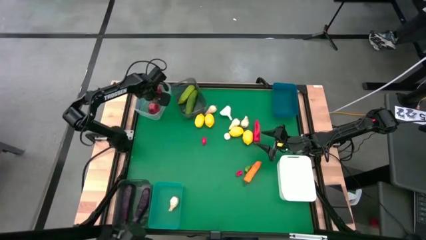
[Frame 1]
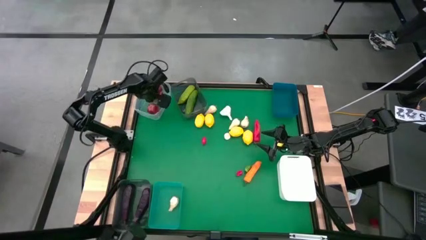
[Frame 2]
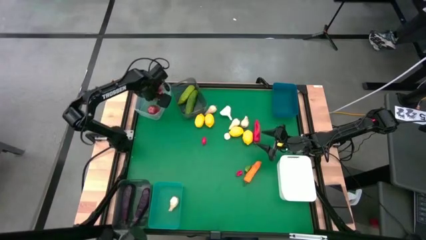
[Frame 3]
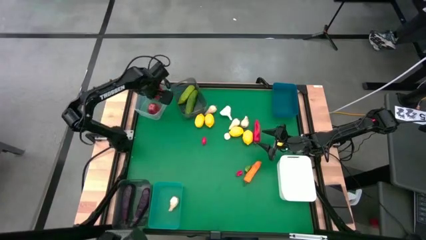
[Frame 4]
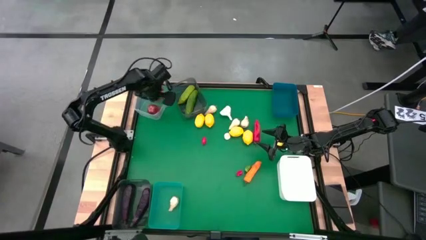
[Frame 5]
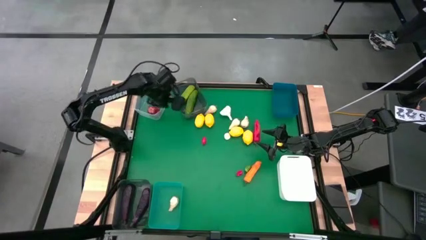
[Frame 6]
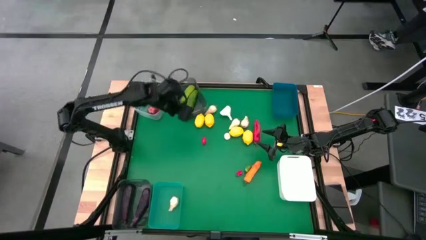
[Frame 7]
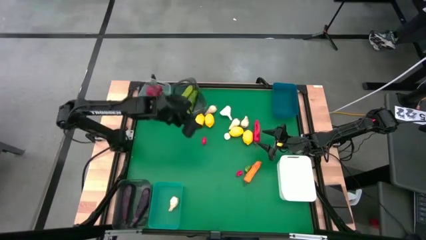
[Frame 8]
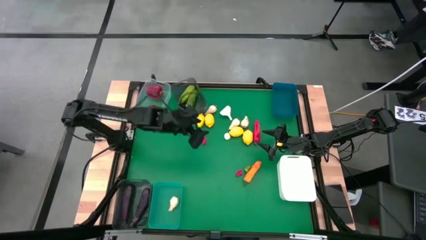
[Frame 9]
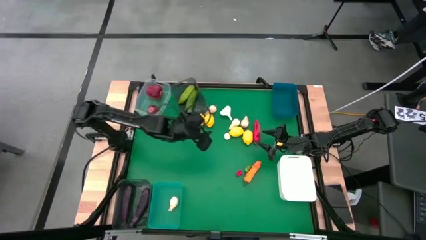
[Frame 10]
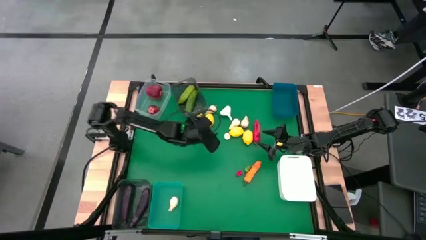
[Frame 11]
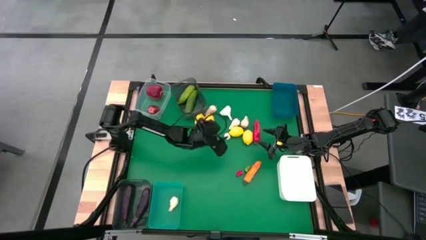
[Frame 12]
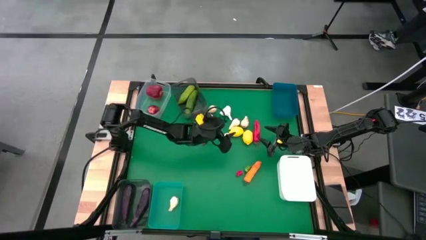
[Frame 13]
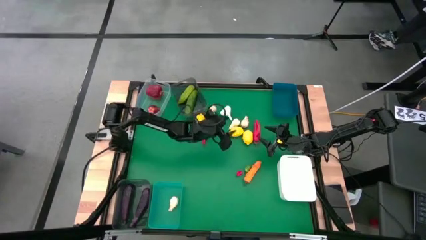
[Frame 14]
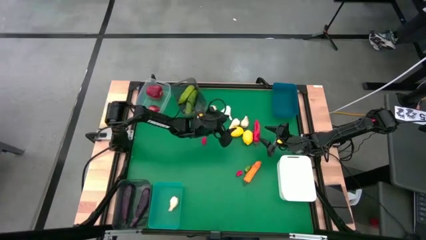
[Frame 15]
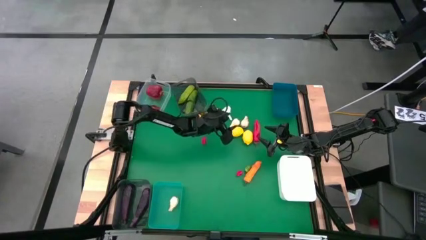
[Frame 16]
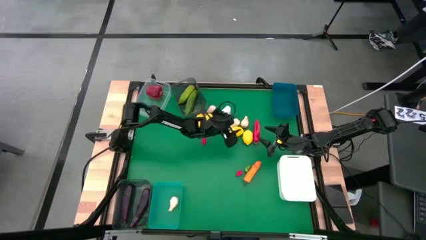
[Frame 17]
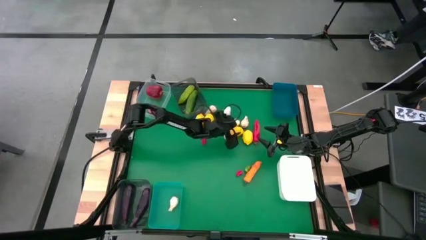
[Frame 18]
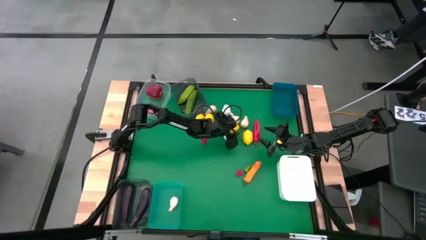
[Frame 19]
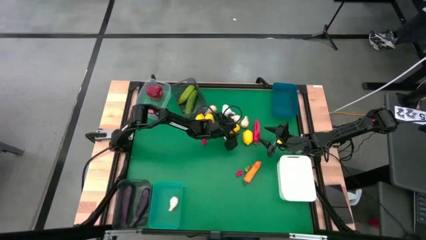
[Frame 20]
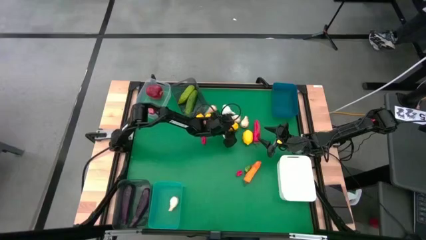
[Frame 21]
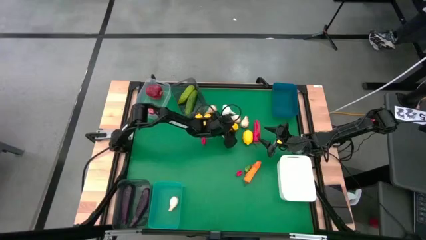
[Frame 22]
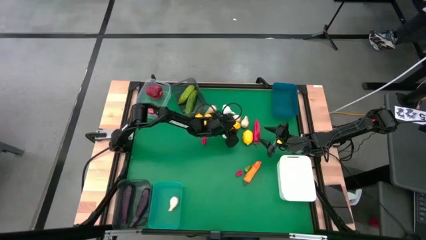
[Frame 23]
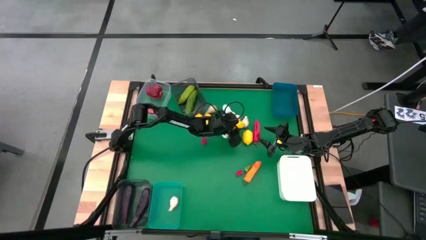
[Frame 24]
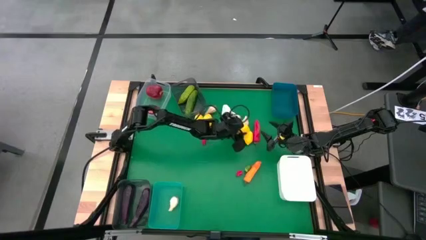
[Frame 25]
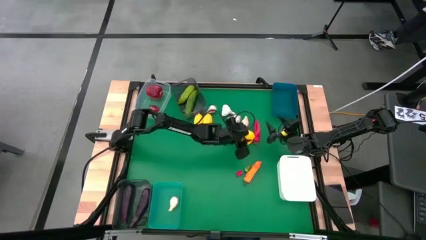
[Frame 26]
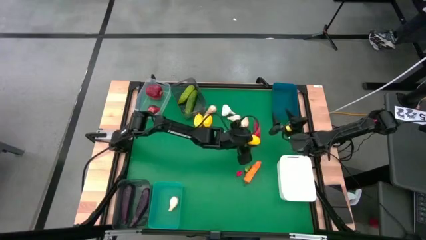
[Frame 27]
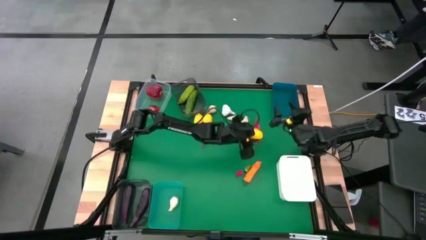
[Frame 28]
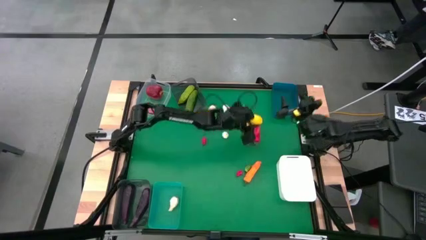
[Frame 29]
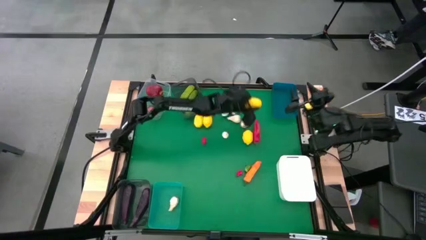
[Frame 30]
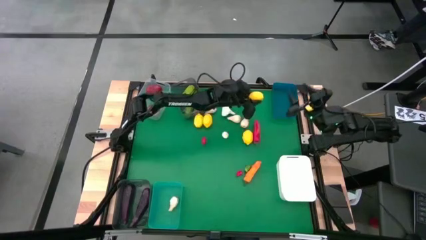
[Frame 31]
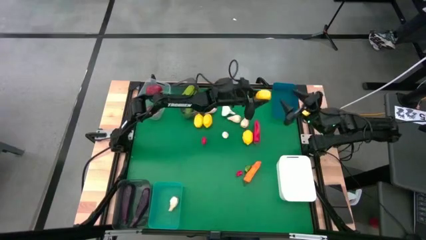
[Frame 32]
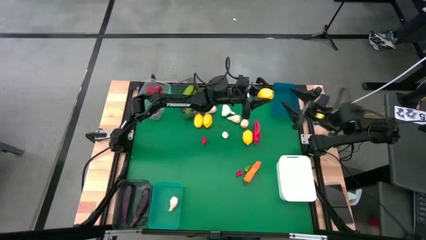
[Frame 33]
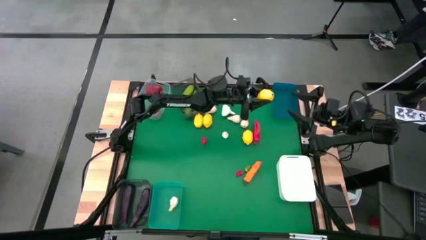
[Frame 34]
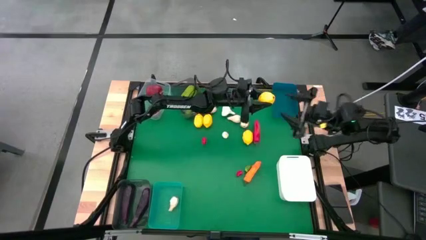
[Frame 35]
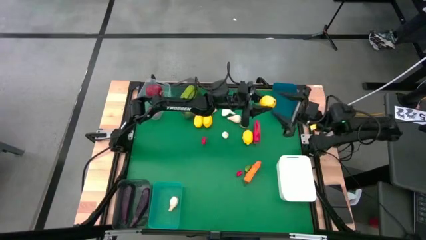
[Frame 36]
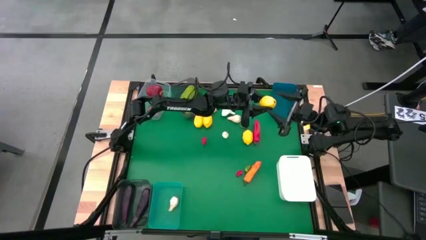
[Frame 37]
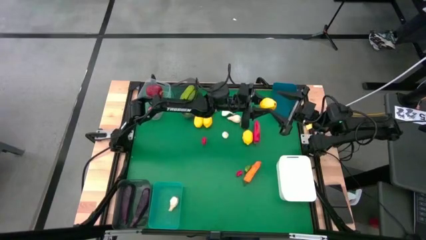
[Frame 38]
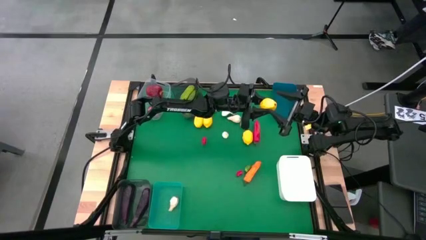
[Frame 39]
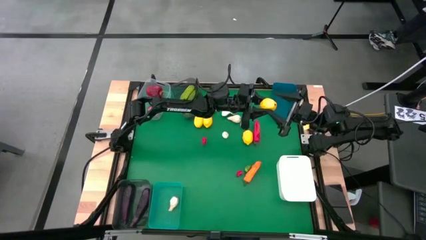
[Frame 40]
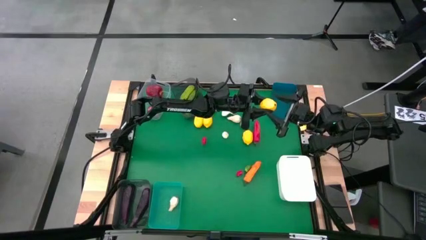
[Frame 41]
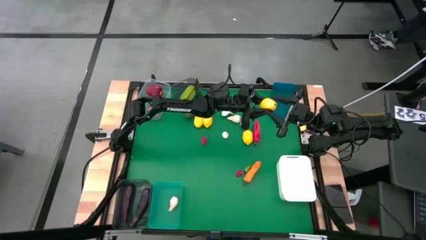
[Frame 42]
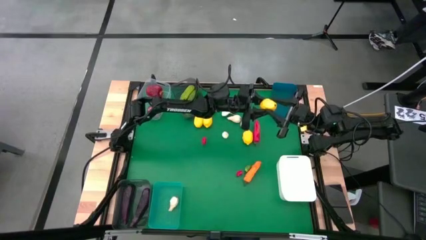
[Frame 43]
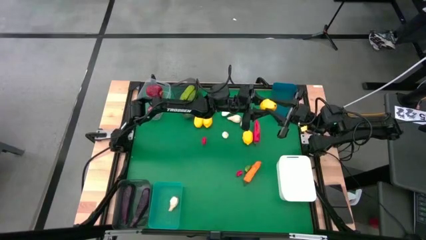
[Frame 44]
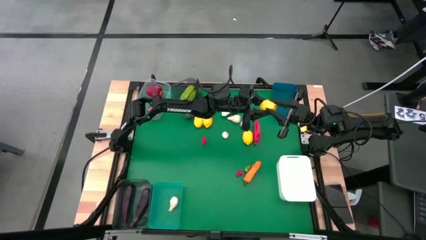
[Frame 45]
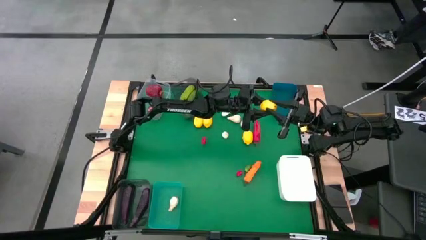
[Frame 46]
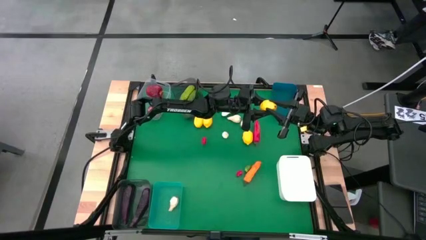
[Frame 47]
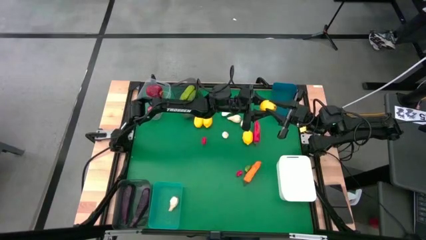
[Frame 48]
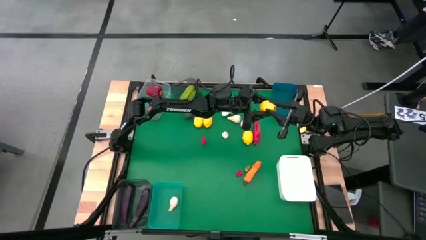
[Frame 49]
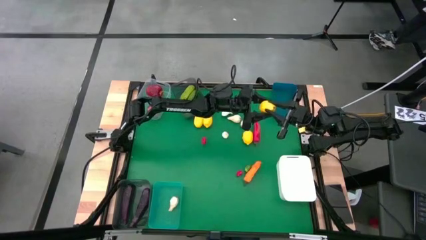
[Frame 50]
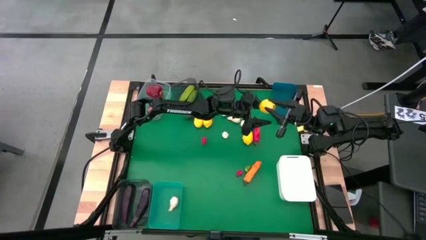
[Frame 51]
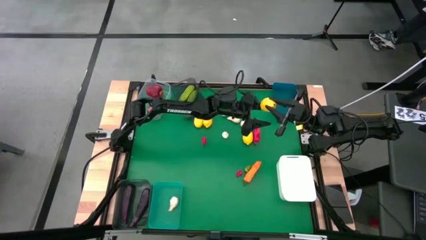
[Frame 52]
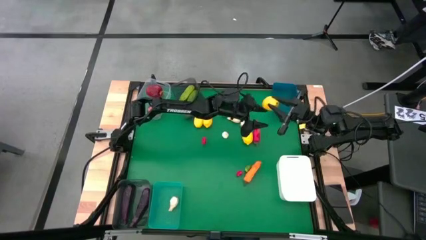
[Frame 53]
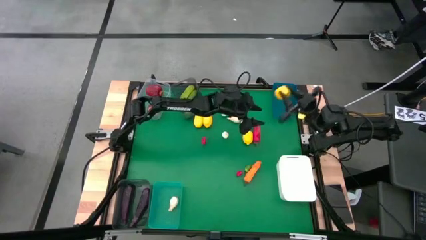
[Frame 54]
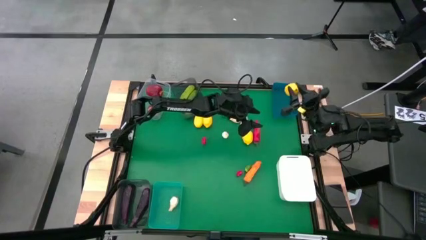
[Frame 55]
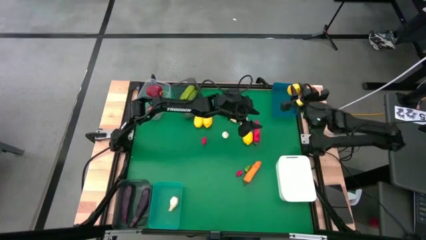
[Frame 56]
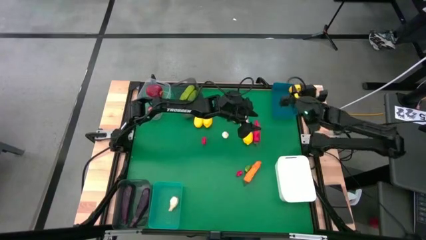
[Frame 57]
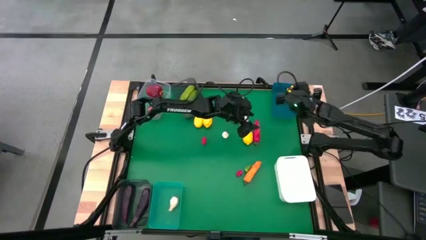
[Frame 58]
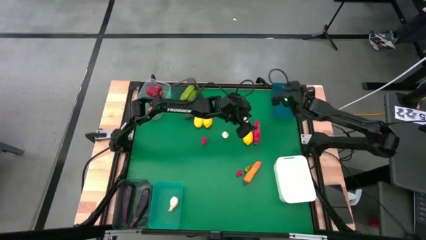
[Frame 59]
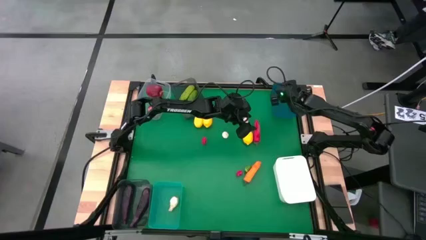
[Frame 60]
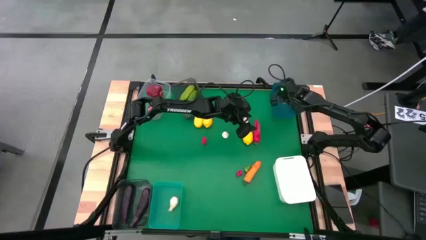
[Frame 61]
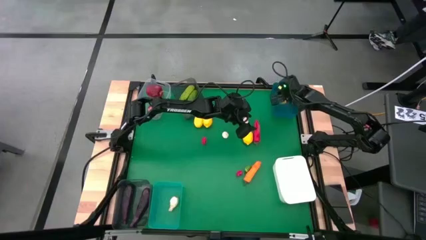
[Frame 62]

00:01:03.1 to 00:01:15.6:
Task: Sort produce into baskets
Put the lemon into the blue bin

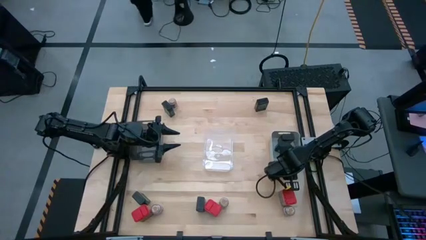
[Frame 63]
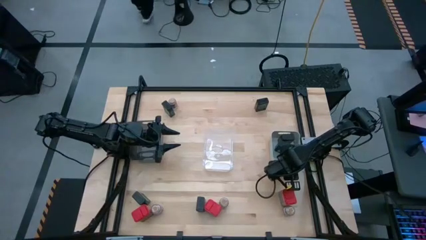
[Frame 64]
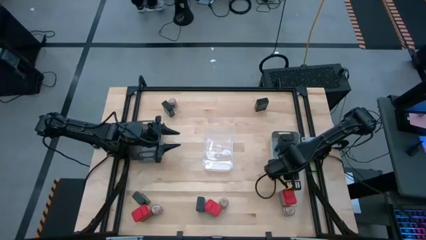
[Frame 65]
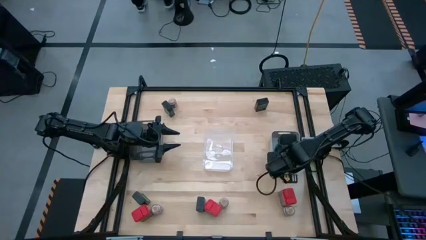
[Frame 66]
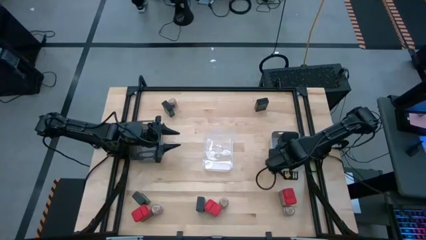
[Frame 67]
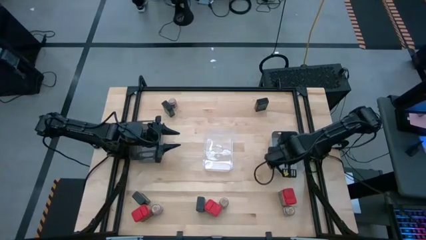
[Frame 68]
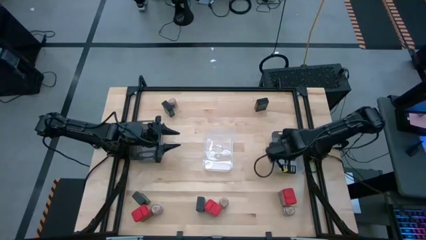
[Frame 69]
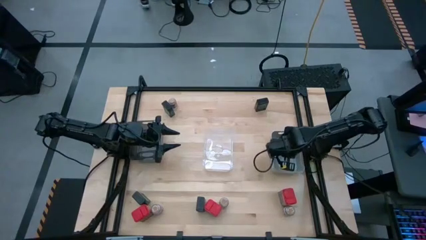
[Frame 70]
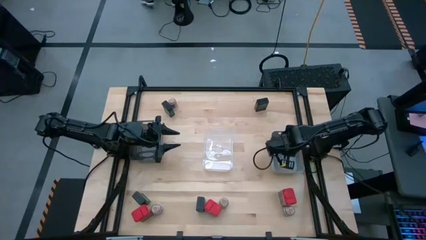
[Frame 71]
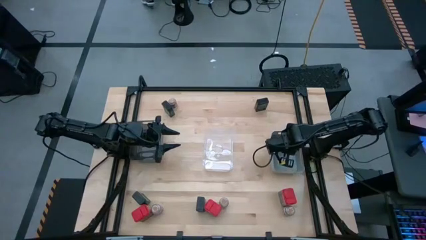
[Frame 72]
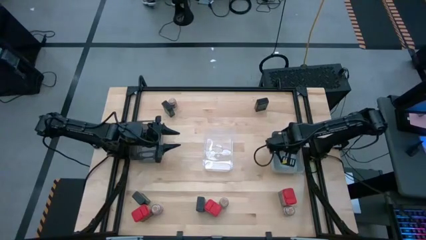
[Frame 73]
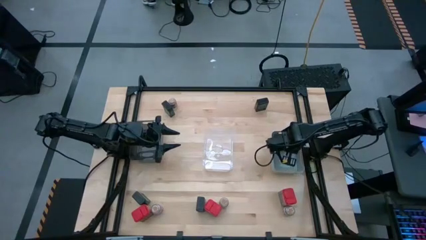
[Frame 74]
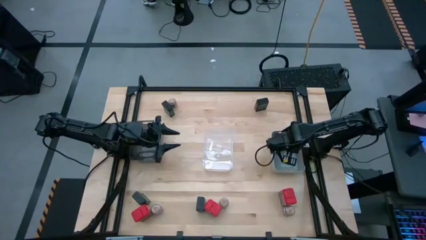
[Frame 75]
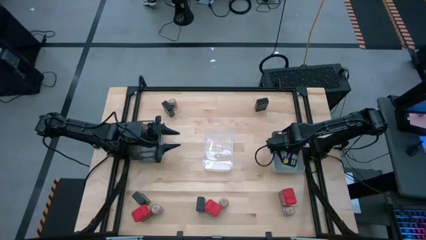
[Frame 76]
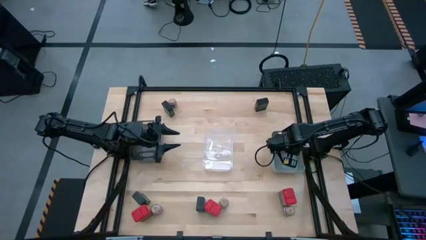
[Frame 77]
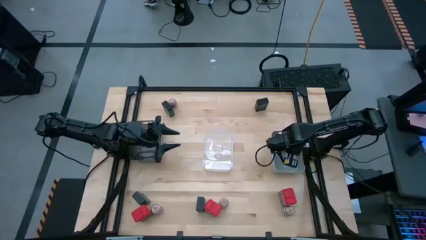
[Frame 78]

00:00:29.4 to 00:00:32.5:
Task: Sort spices by type
Adjust the black seasoning can in the gray bin
